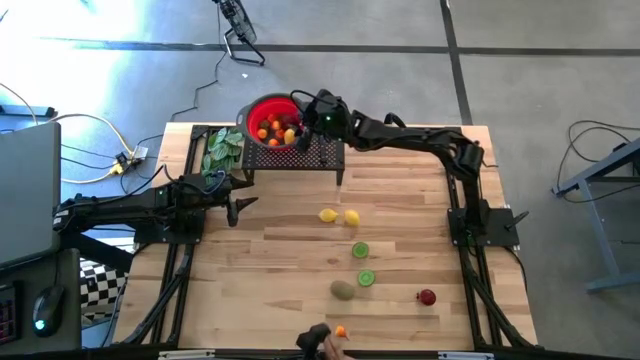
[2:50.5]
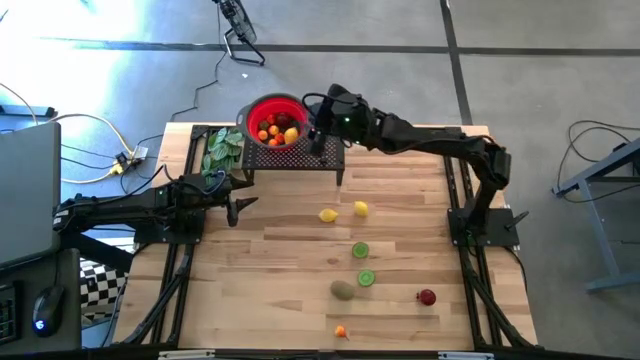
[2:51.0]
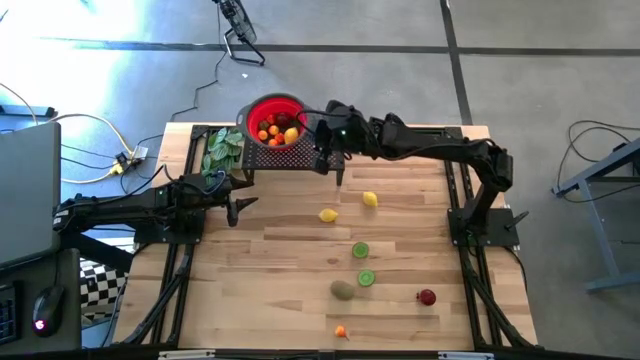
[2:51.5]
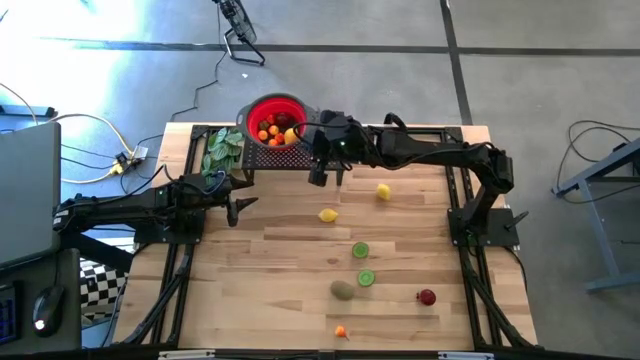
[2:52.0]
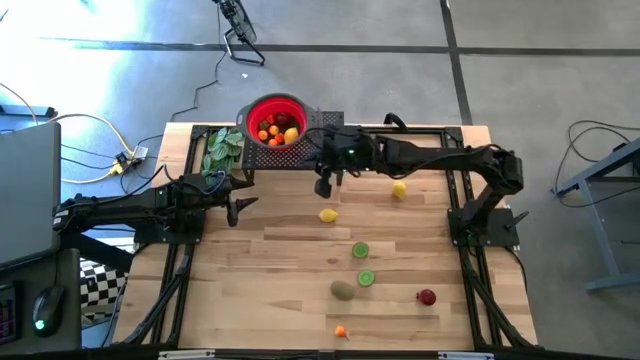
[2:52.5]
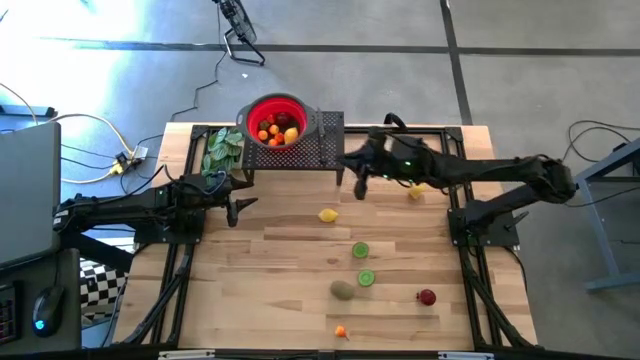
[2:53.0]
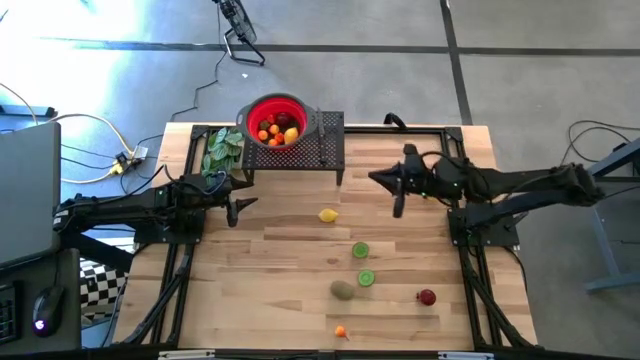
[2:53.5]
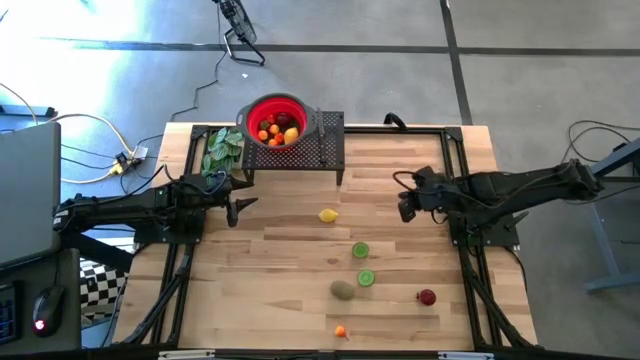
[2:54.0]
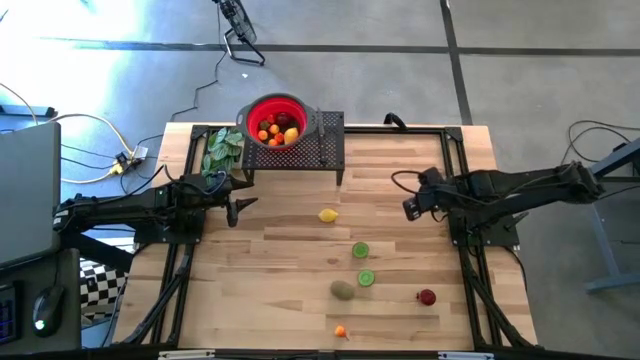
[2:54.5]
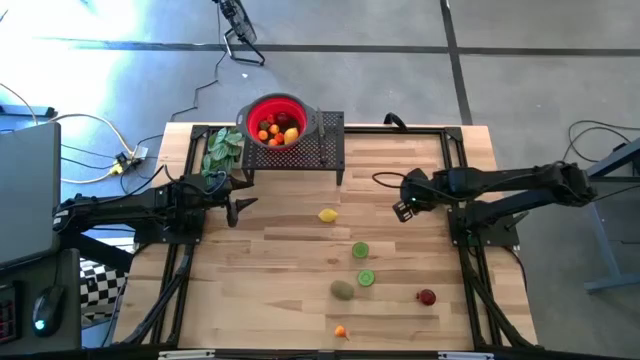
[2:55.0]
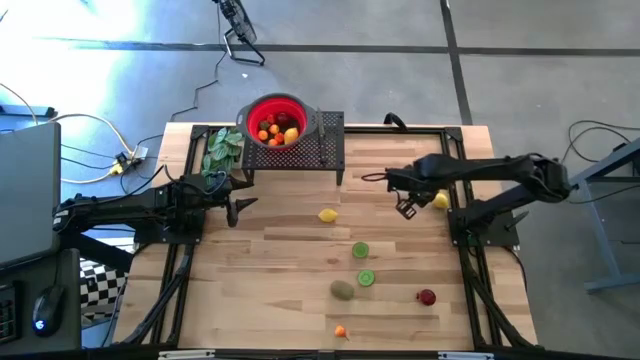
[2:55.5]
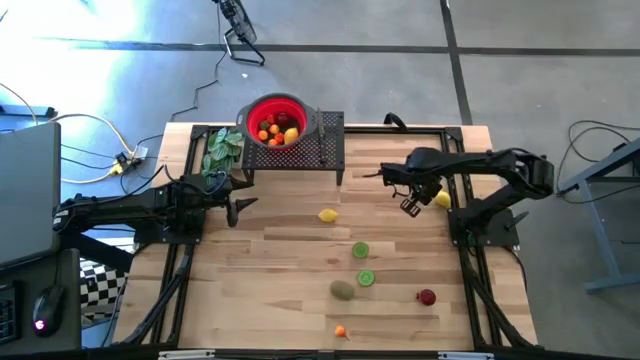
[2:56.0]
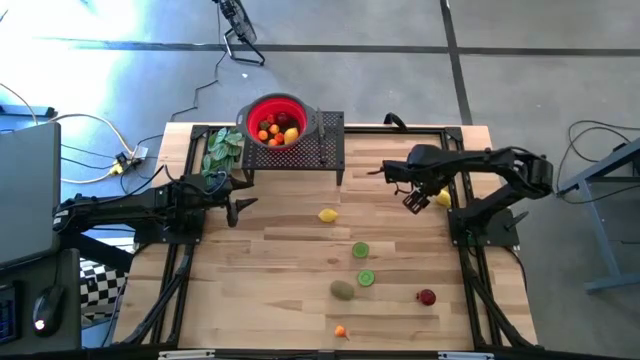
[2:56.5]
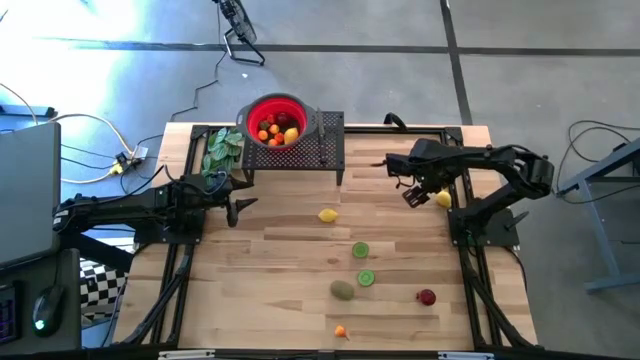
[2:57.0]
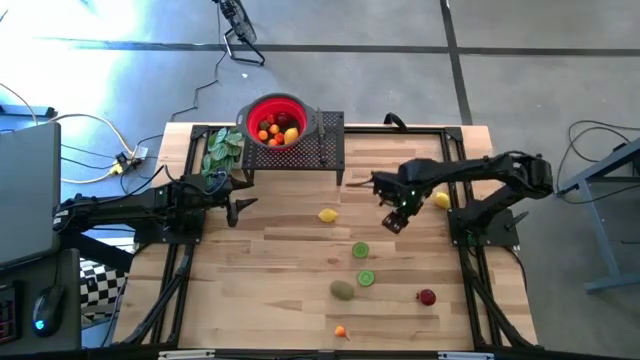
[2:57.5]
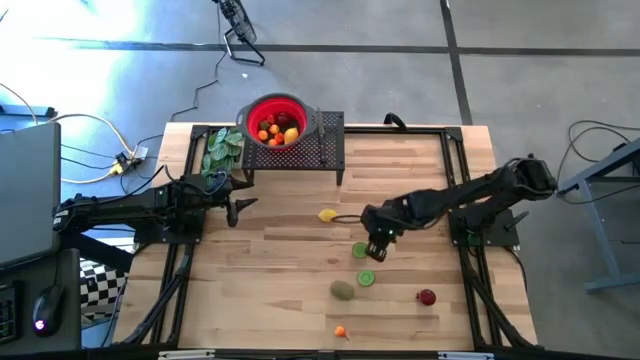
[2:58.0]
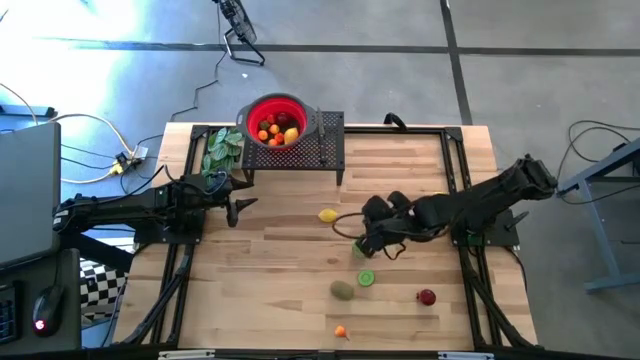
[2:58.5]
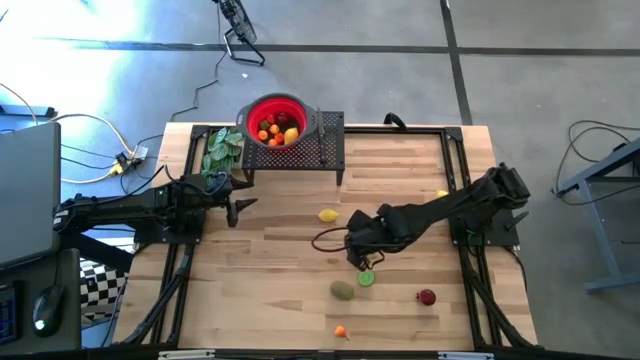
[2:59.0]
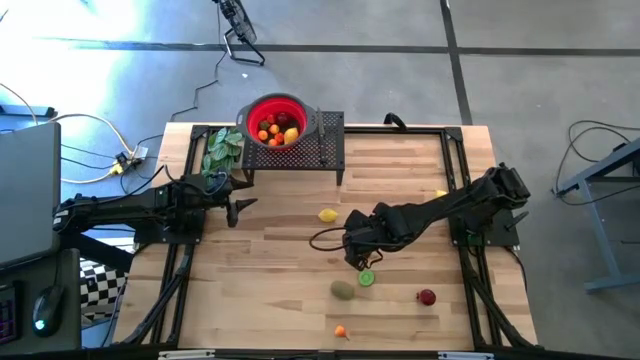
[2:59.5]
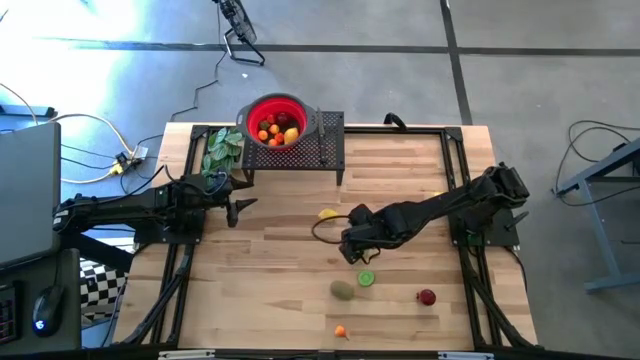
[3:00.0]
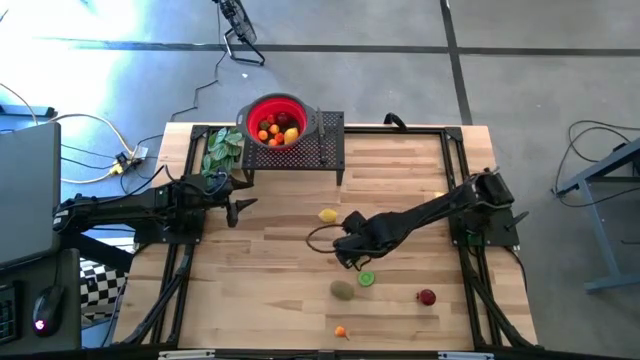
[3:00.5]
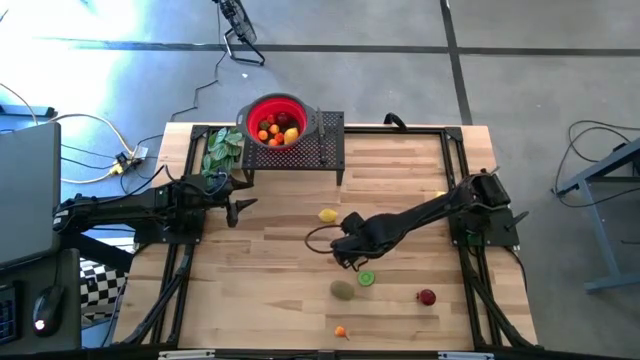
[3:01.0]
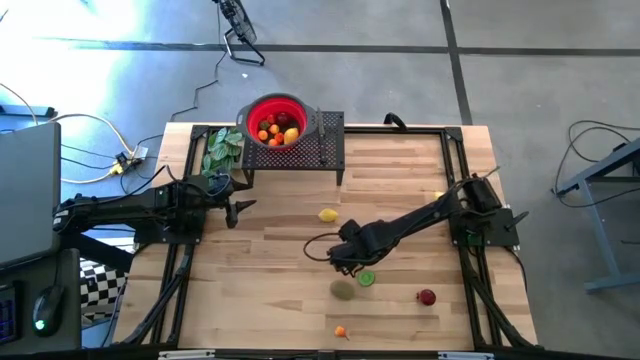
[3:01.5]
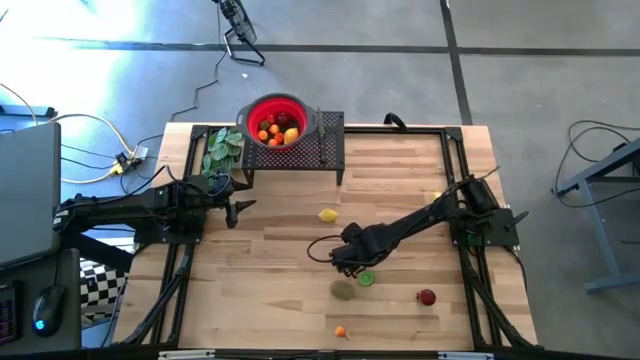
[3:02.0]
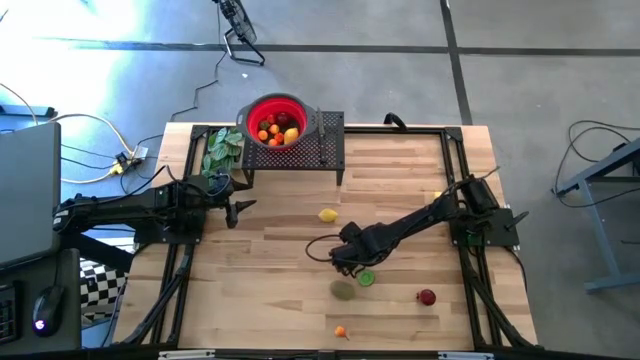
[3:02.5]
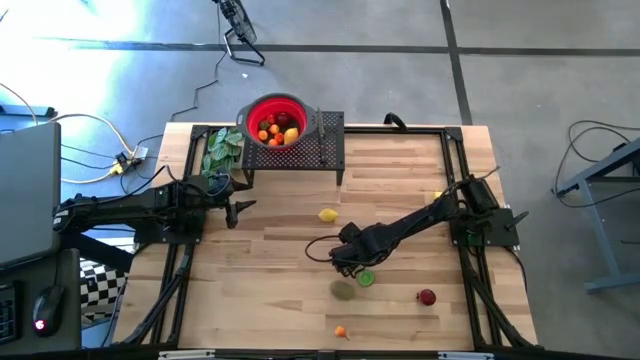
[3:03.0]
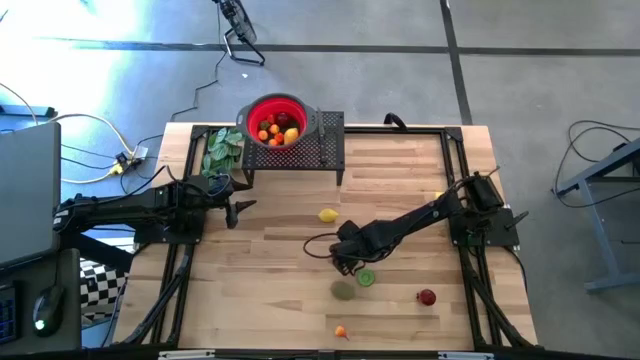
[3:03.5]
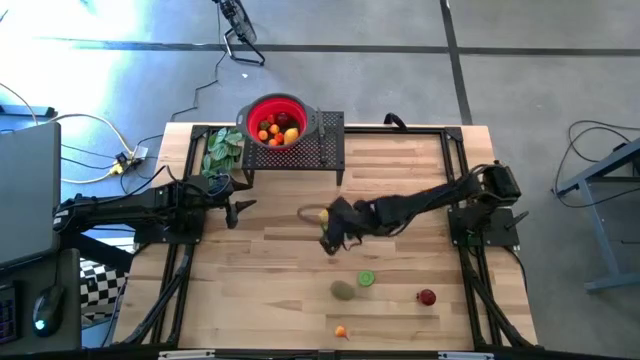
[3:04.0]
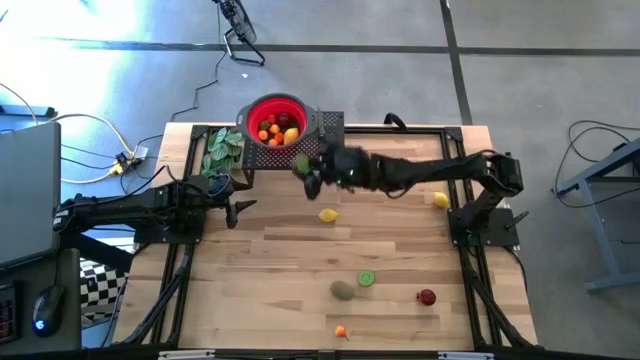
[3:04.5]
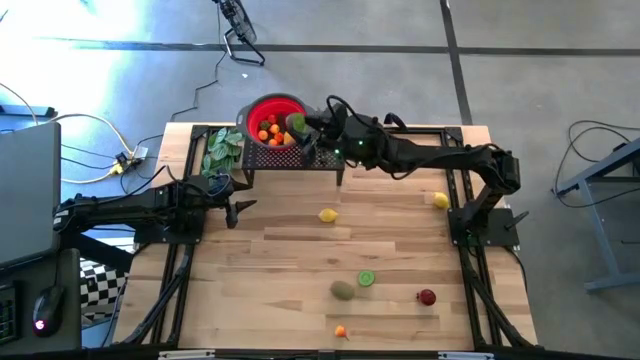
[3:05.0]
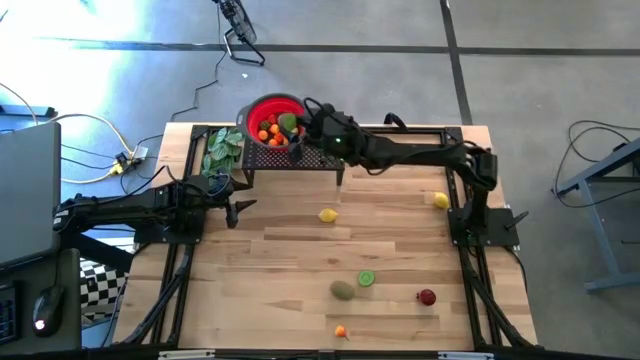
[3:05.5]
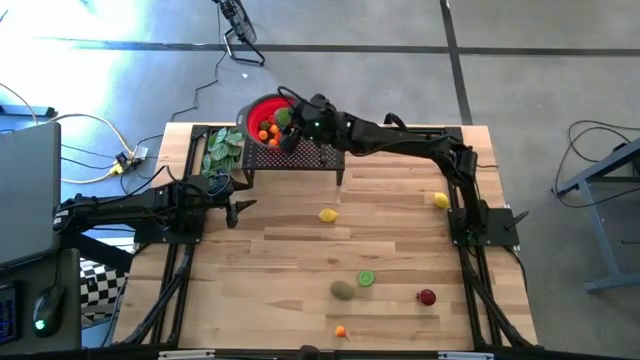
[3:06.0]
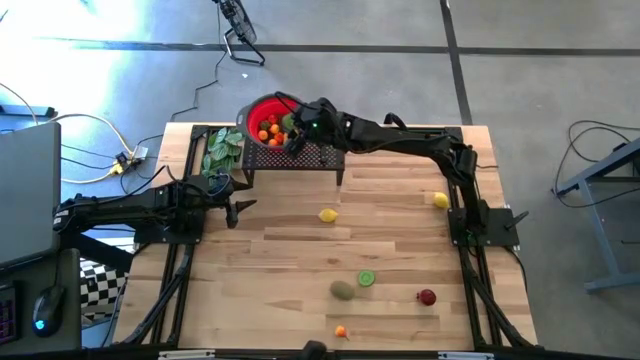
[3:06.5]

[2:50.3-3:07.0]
Task: Pick & Place Fruit
Put the brown sliced kiwi into the red strainer bowl on the shelf

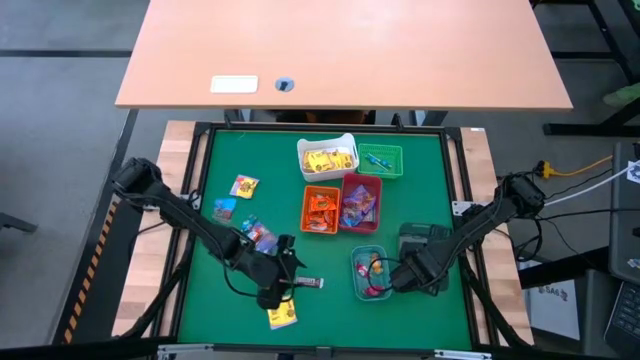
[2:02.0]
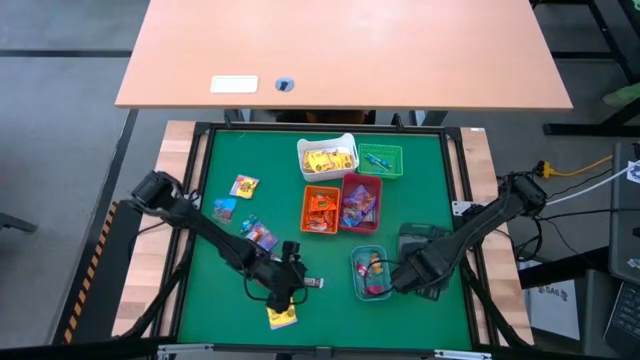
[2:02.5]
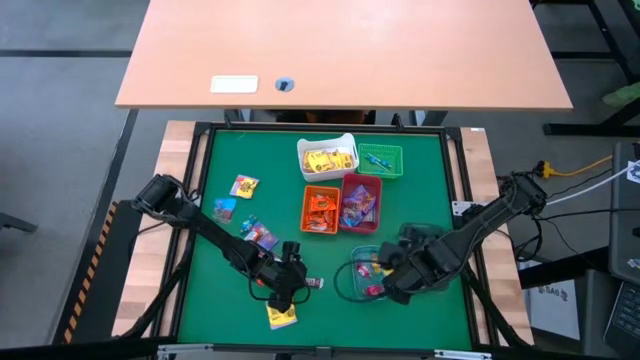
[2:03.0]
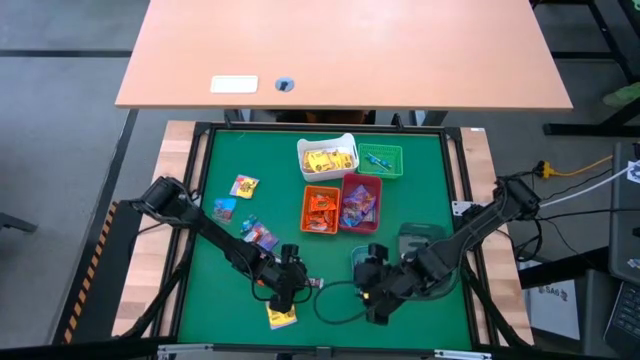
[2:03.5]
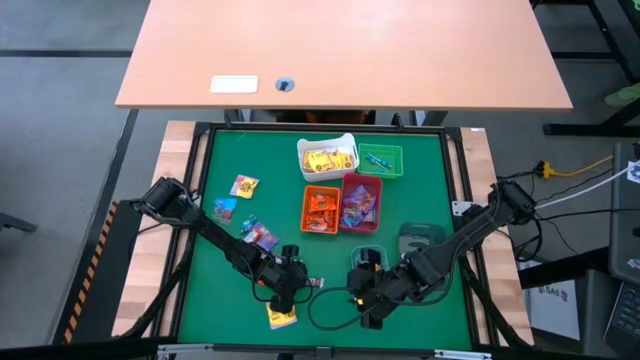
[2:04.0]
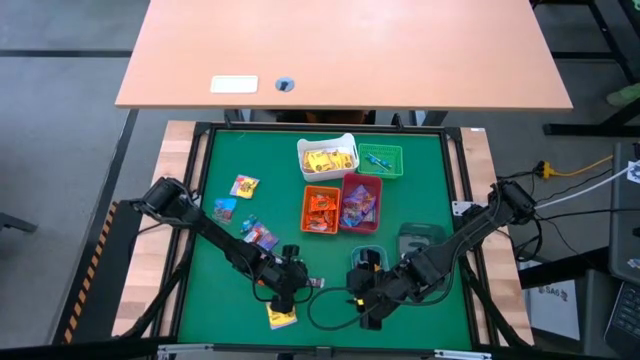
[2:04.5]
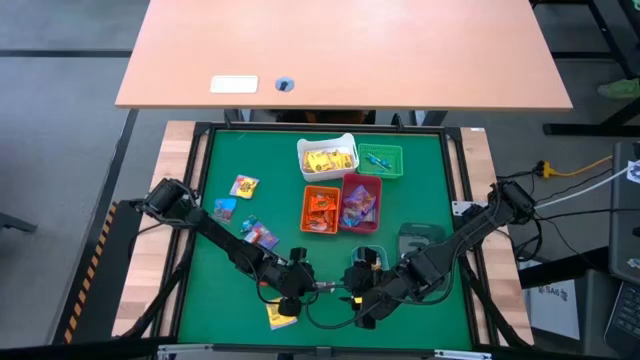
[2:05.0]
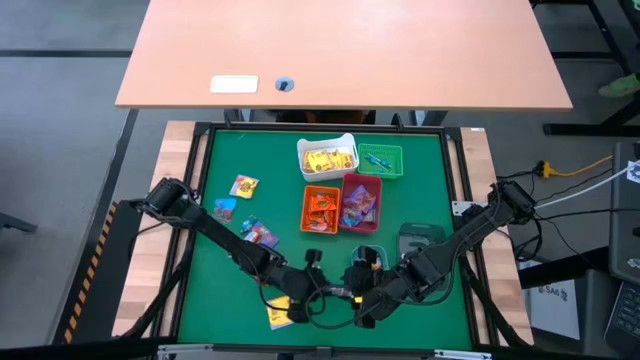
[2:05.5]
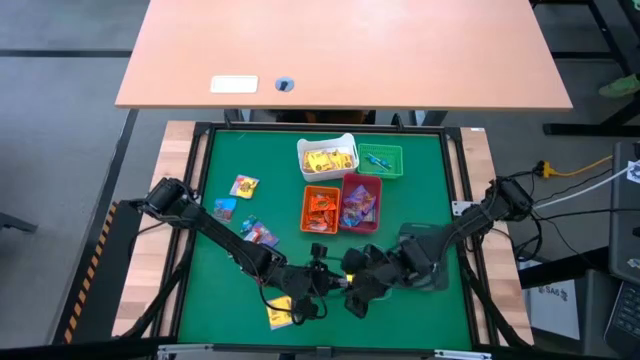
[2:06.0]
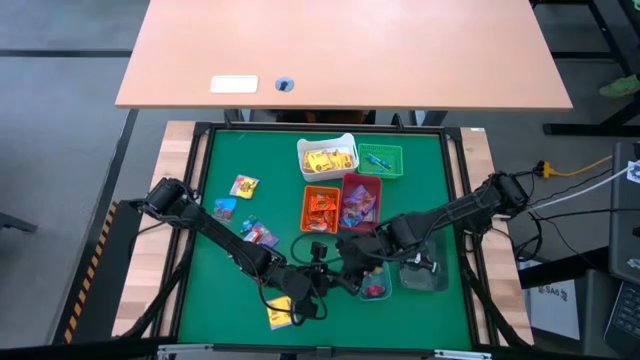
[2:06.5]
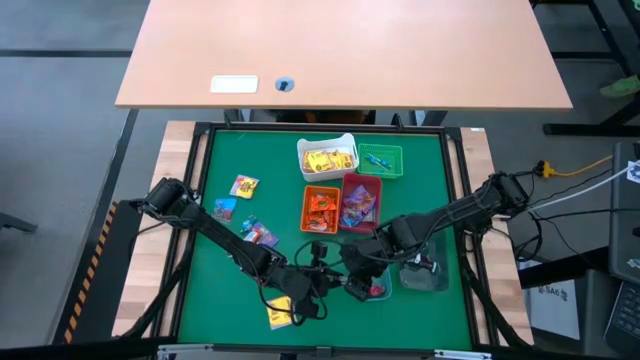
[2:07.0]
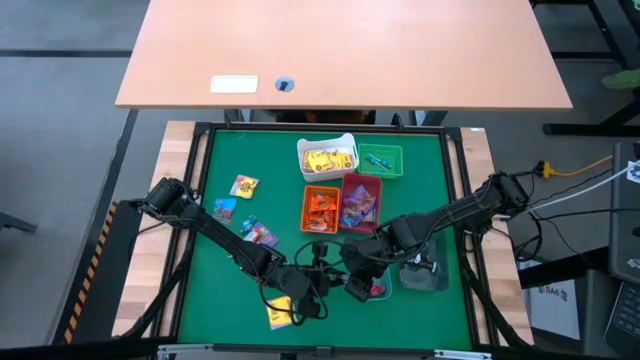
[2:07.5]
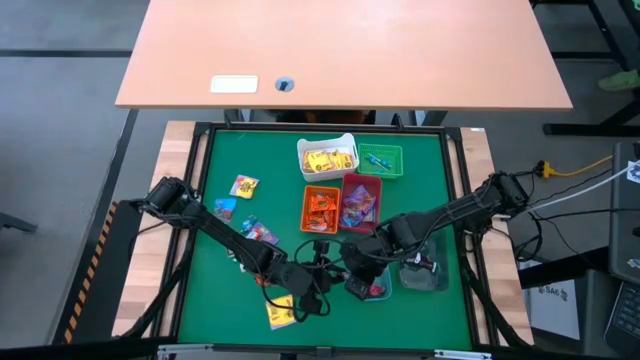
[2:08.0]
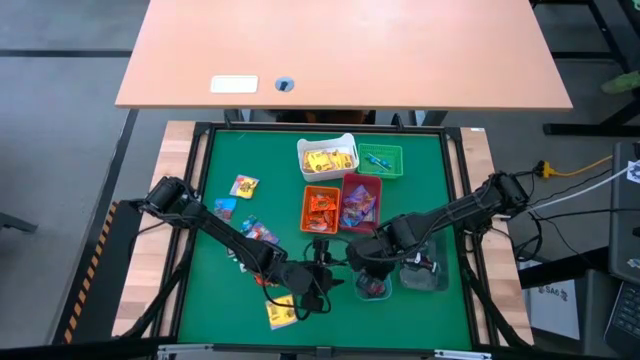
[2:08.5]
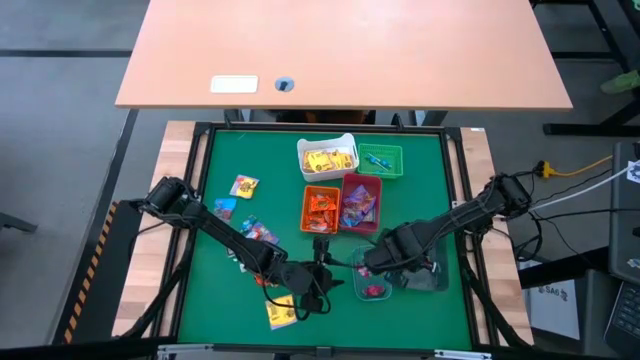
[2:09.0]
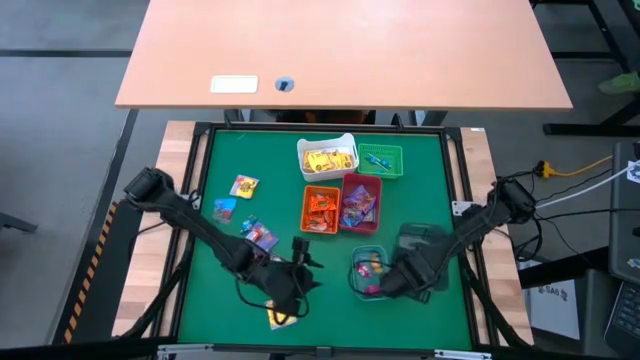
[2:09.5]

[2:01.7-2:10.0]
Task: Sort candy
Put the brown chocolate into the gray bin
